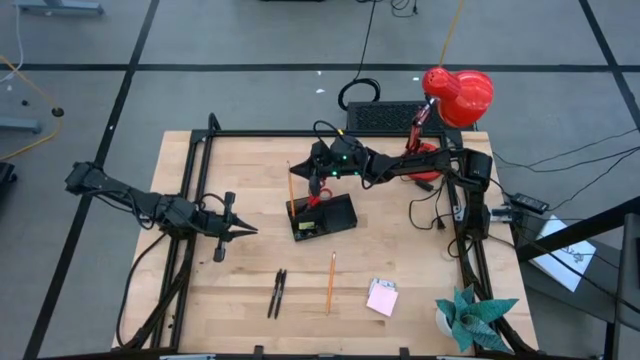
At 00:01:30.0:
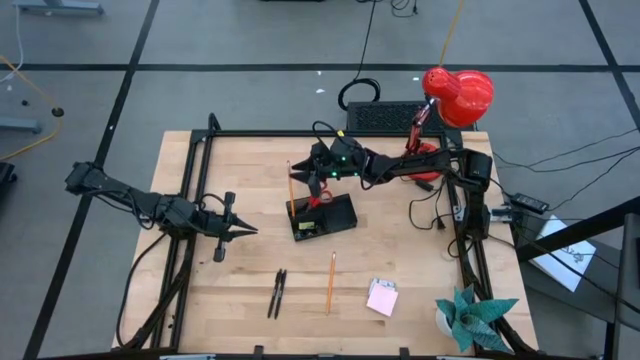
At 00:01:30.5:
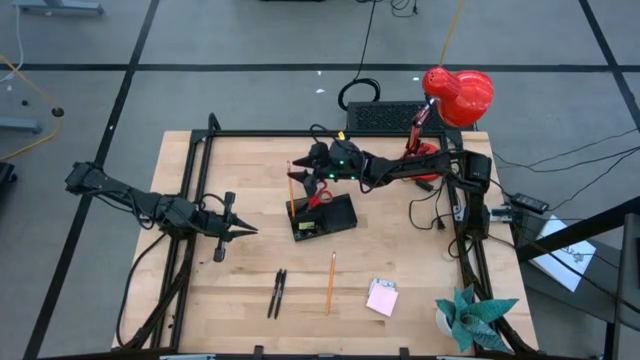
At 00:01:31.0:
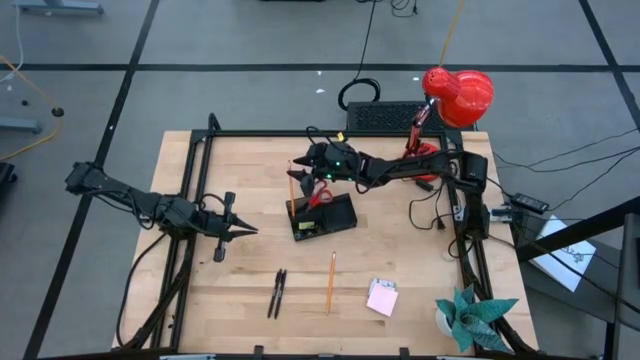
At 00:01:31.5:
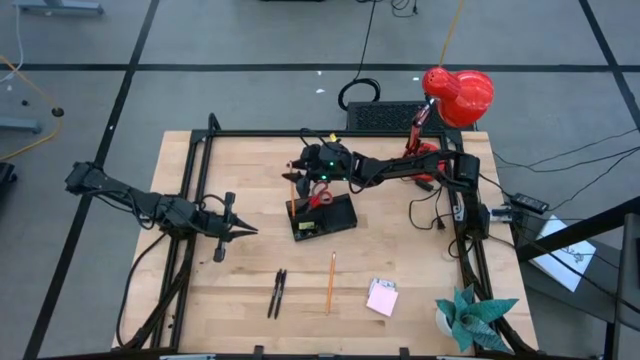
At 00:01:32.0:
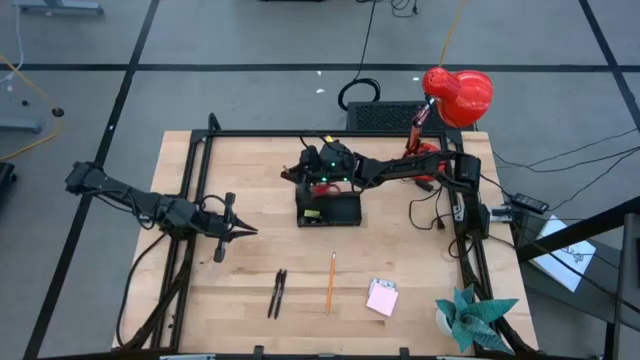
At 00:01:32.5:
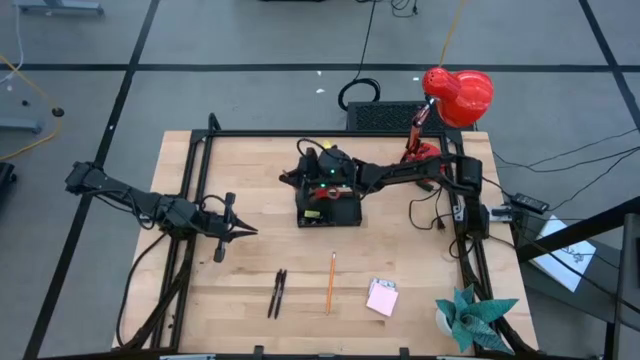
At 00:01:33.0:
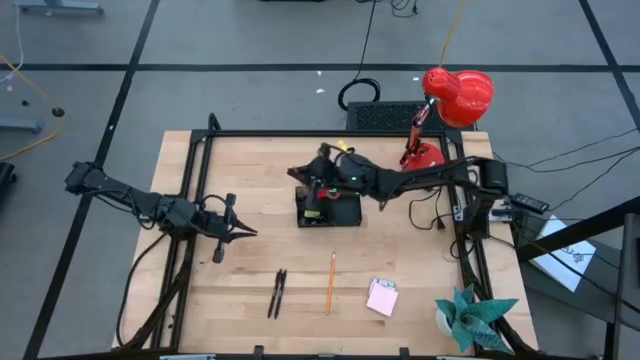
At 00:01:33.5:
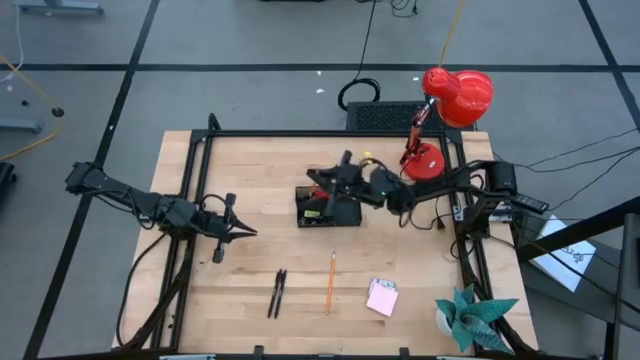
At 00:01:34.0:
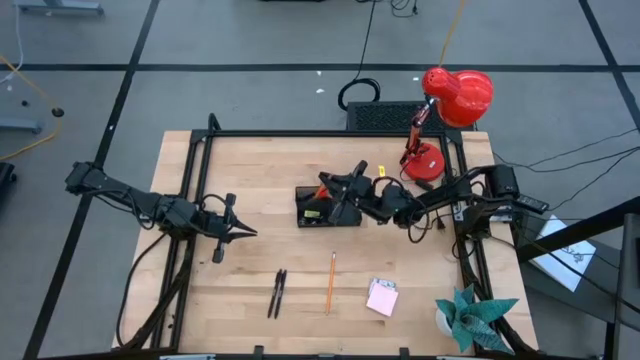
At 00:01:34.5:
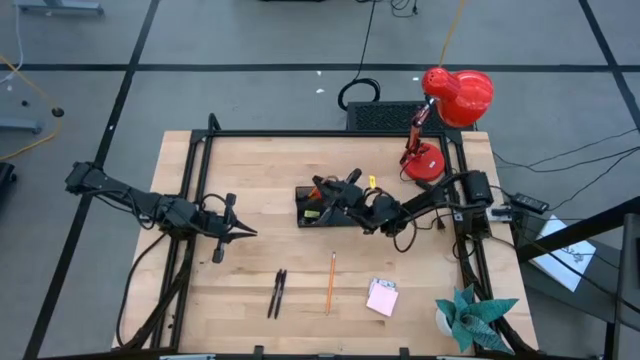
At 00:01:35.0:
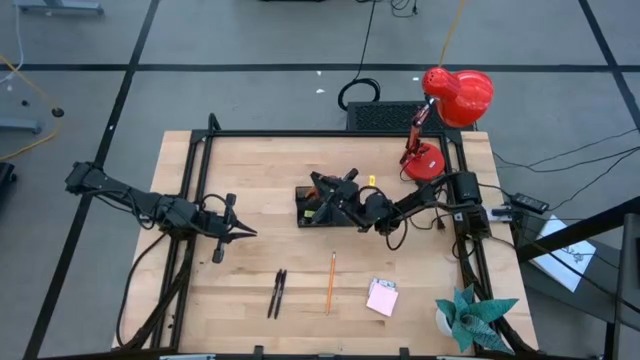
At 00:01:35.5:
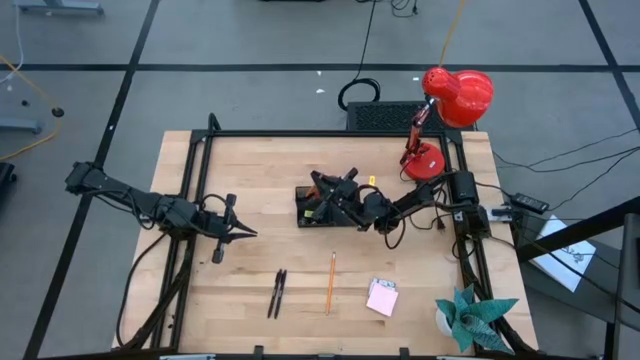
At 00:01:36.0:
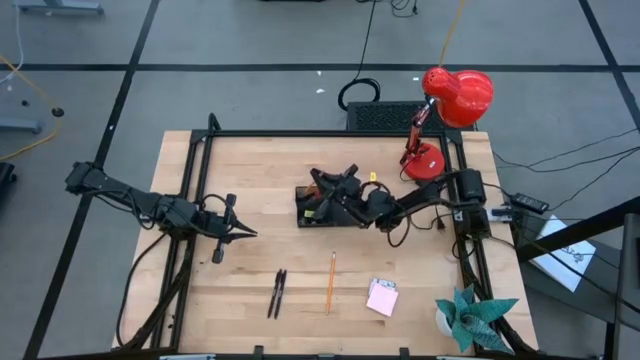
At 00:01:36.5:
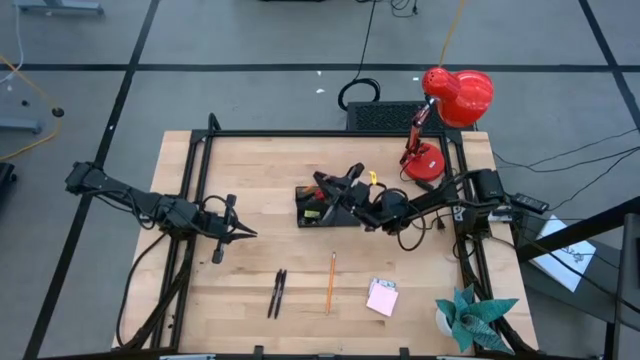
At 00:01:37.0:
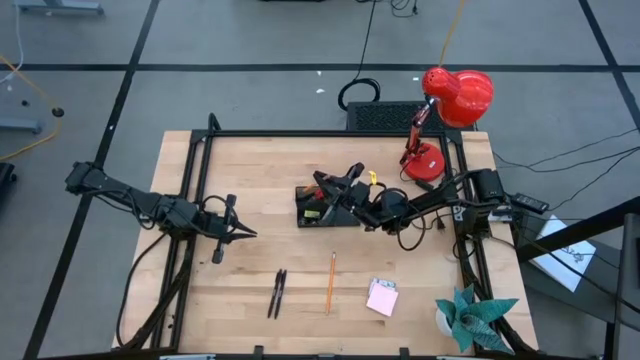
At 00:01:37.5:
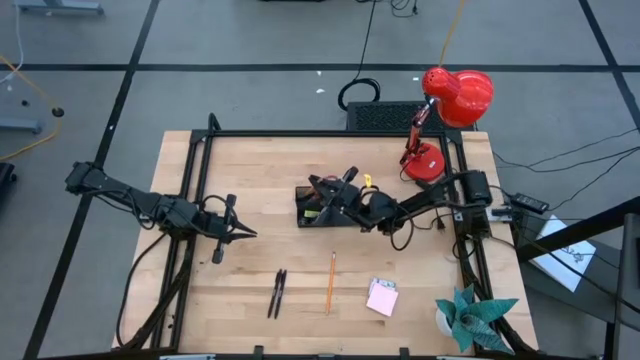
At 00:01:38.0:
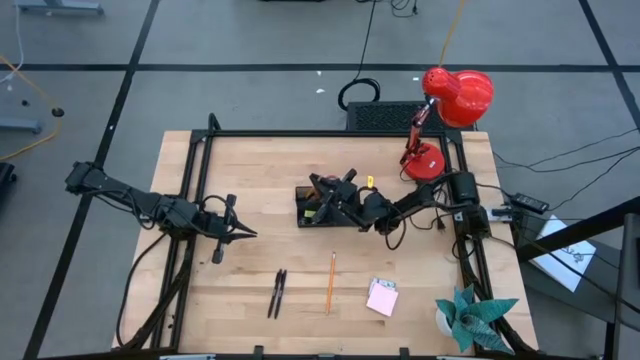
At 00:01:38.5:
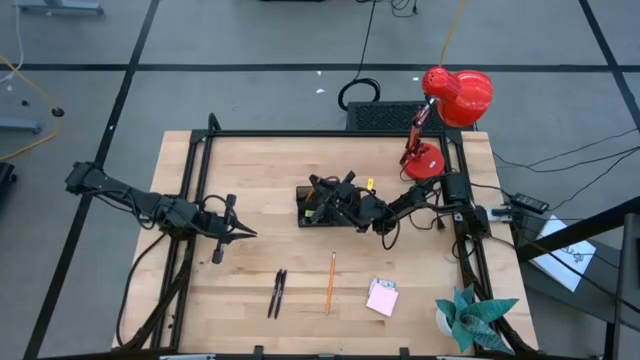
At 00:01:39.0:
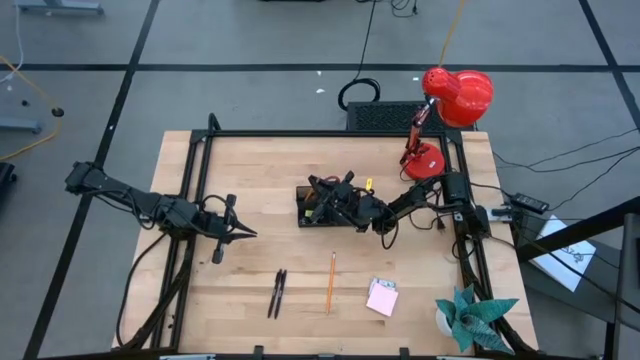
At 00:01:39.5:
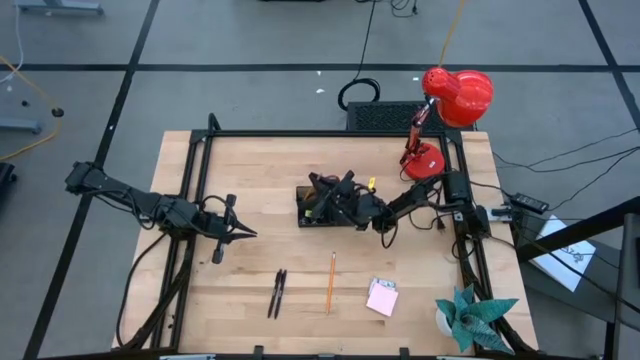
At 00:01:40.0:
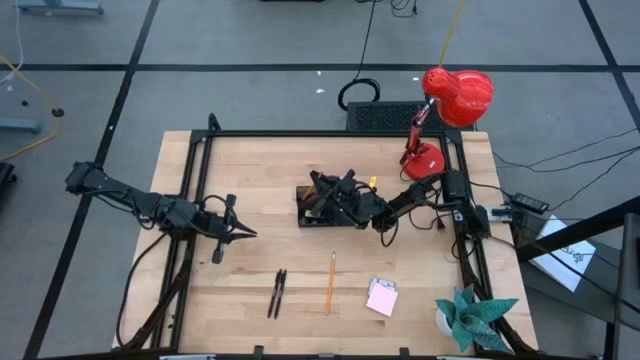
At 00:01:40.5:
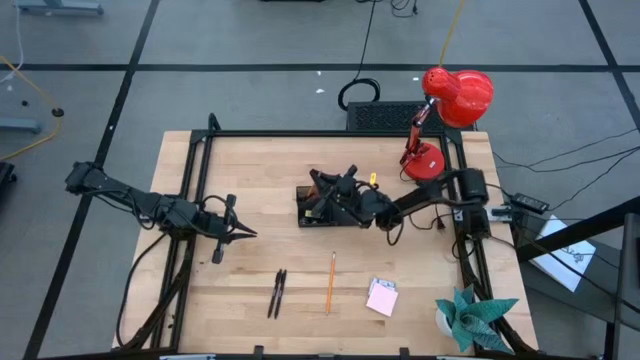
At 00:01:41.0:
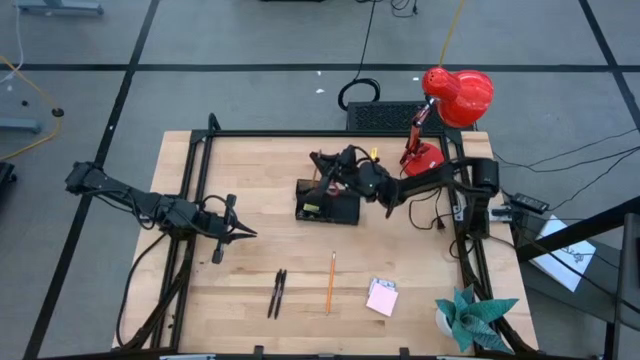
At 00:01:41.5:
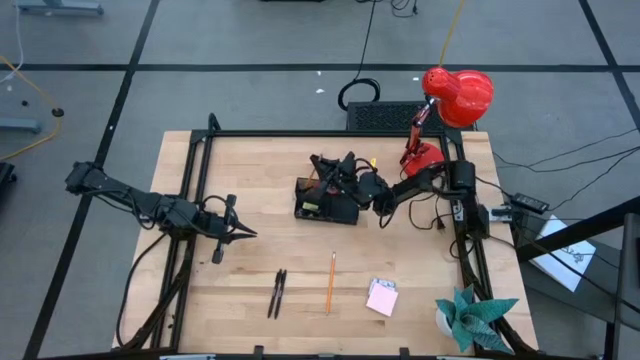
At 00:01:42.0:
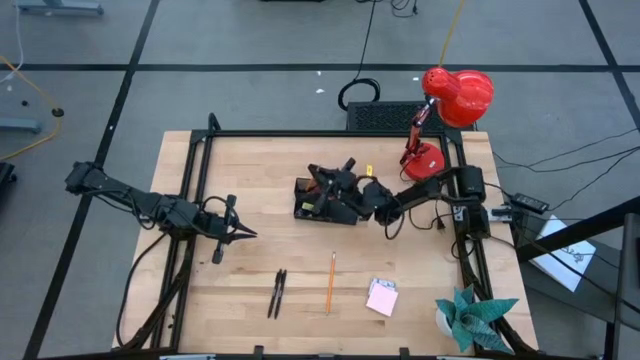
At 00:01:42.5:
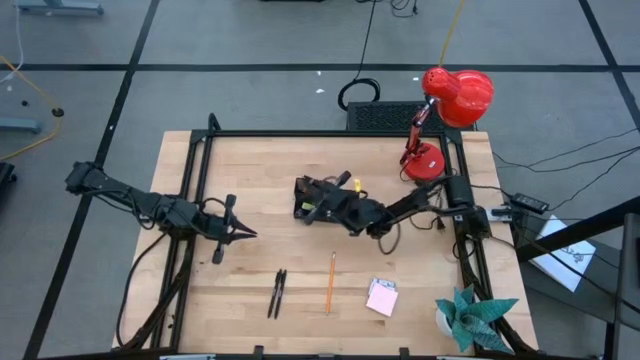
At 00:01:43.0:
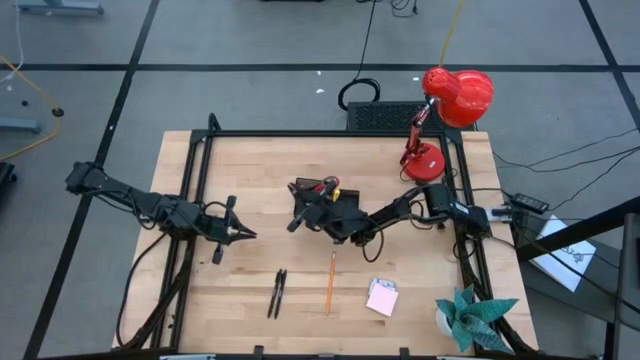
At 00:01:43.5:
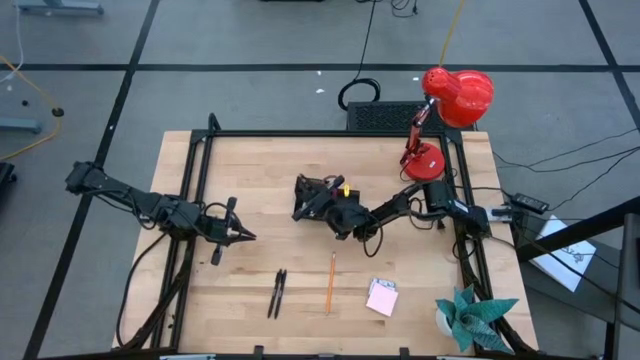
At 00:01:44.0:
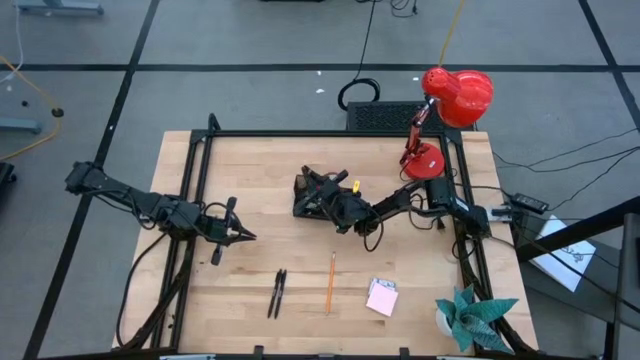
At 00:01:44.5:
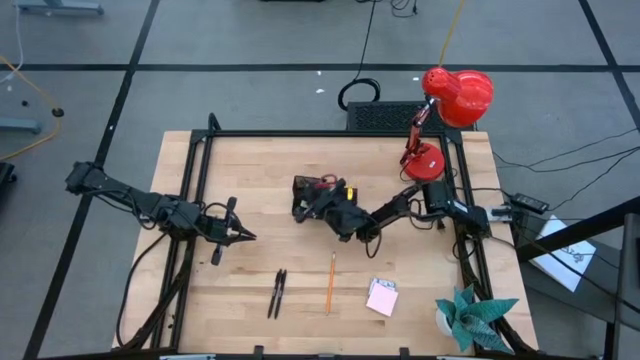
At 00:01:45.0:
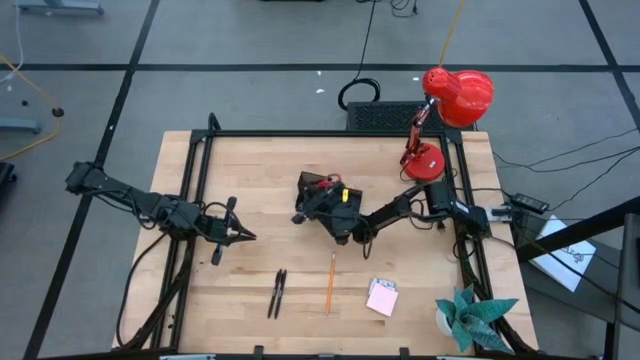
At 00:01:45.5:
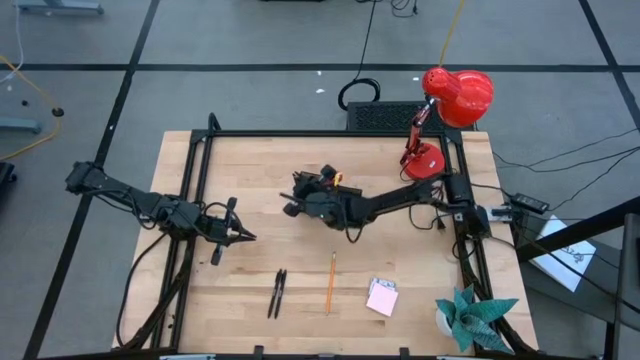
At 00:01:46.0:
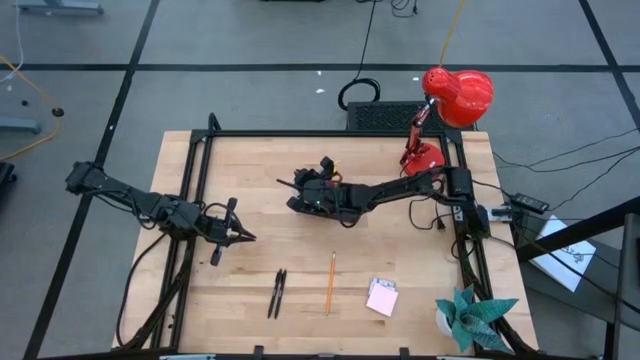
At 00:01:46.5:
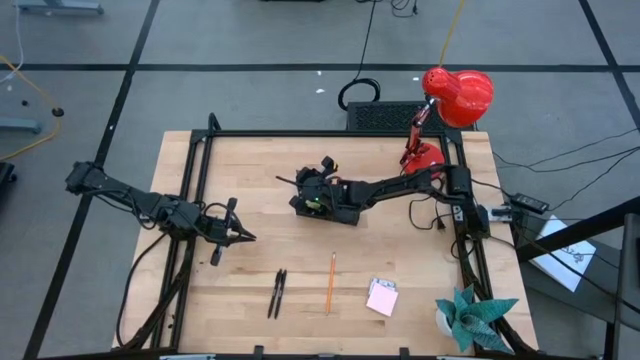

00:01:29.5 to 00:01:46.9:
Task: Pick and place office supplies into organizer
Put the orange pencil into the desk organizer

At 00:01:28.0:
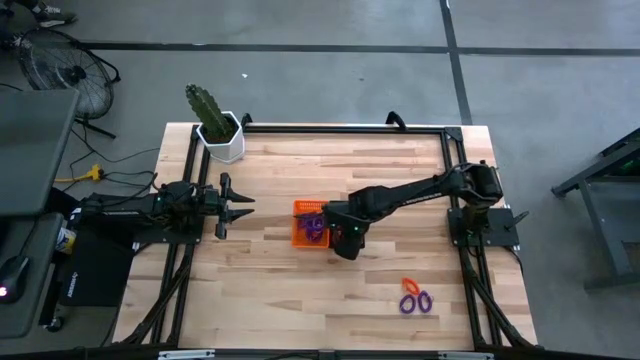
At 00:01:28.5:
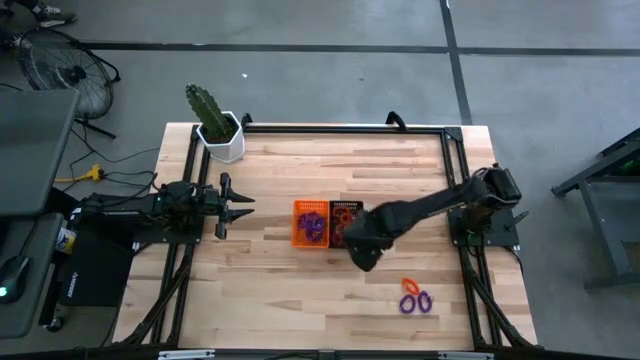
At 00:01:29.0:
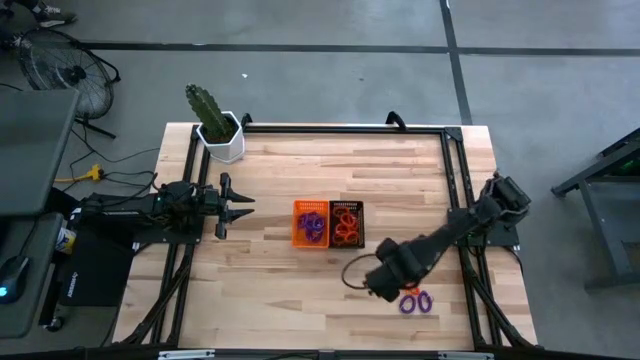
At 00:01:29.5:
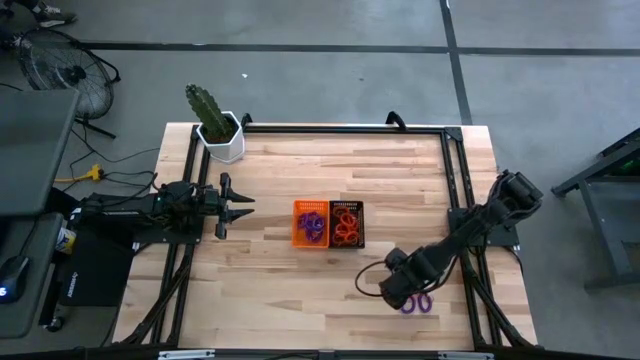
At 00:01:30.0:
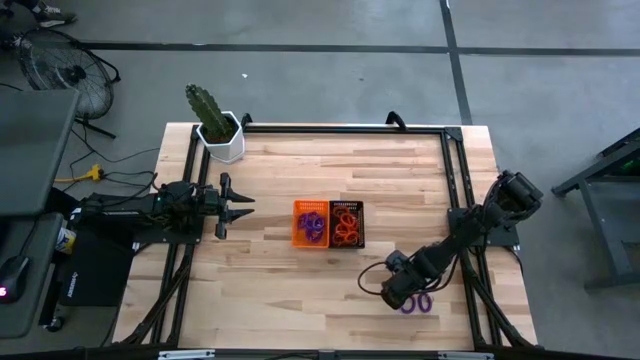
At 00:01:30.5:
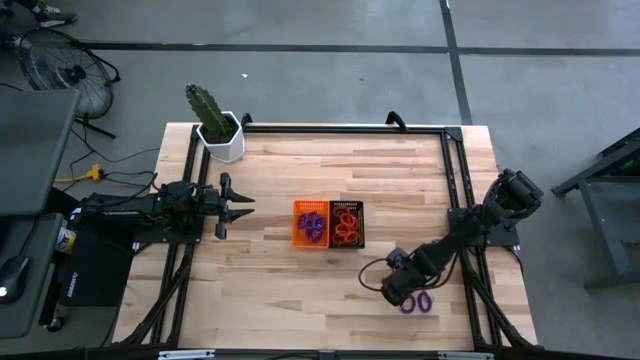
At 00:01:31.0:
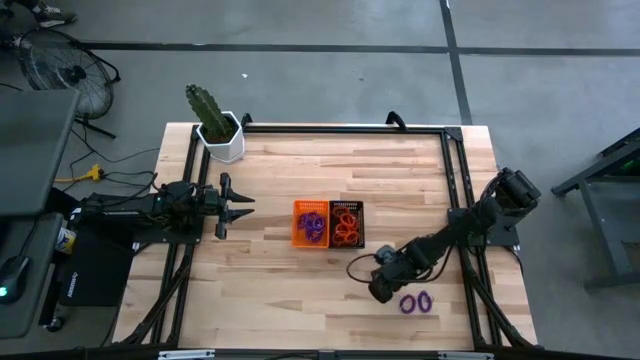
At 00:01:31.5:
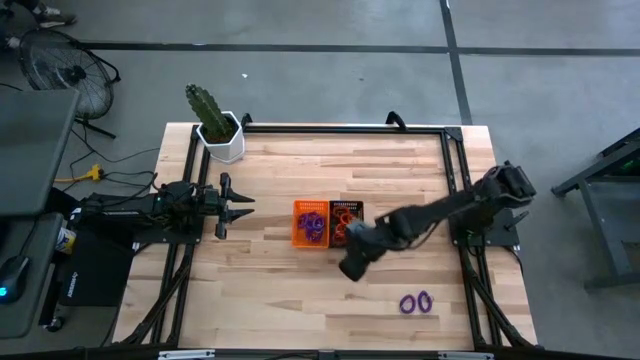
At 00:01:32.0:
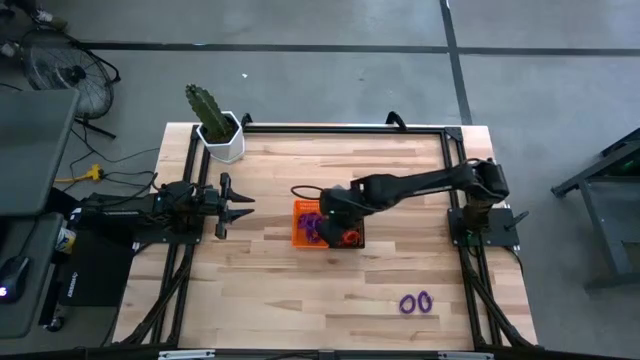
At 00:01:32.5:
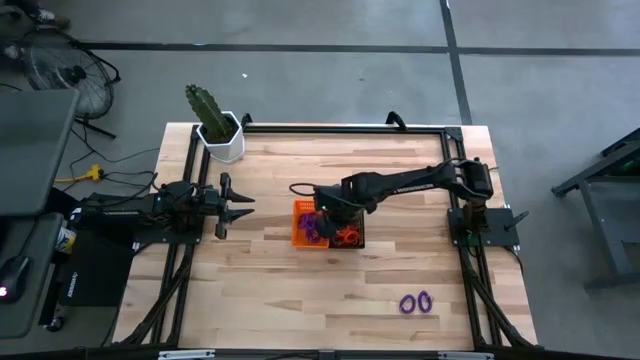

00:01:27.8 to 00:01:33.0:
Task: Sort spring keychains
Put the orange spring keychain into the black bin
